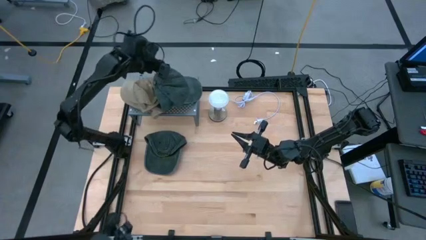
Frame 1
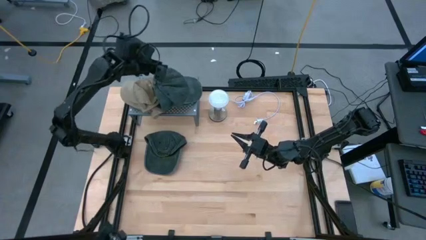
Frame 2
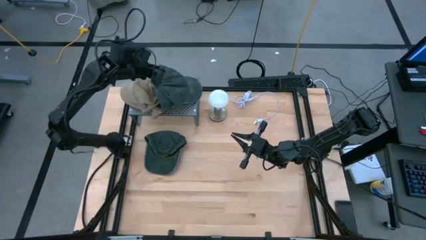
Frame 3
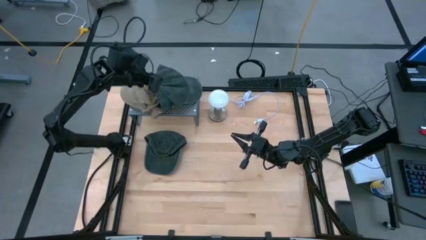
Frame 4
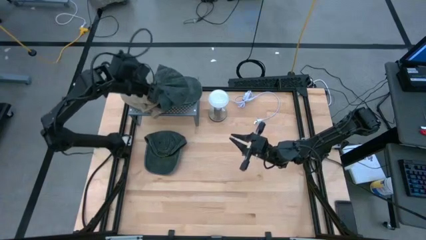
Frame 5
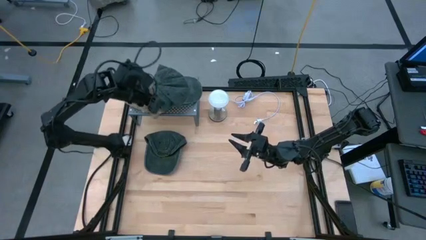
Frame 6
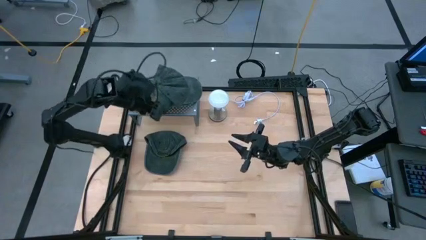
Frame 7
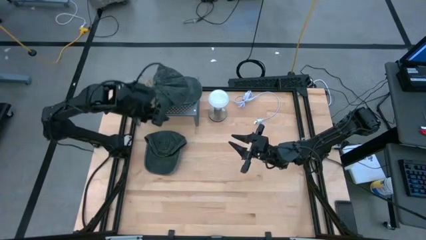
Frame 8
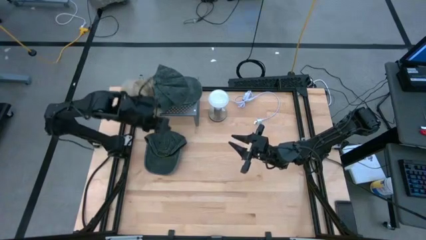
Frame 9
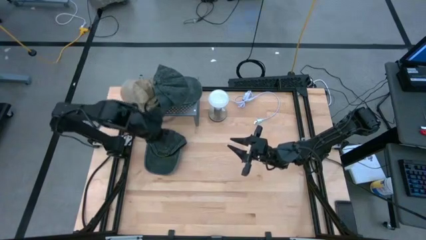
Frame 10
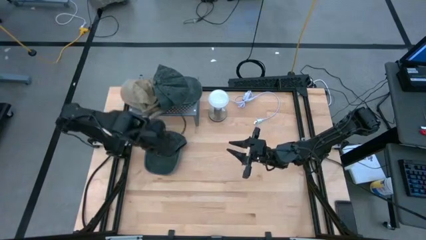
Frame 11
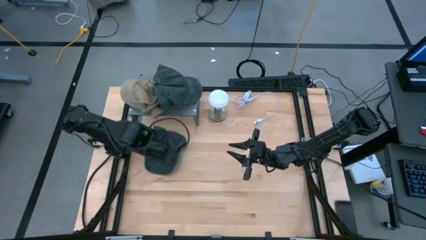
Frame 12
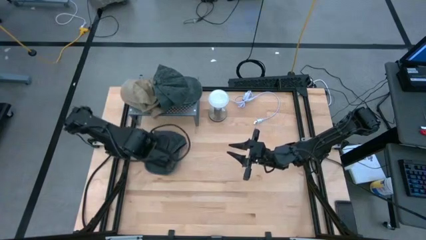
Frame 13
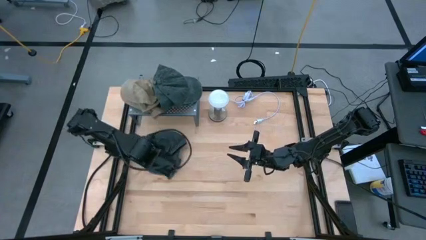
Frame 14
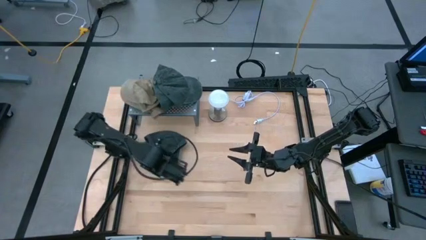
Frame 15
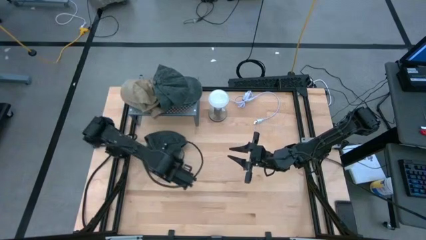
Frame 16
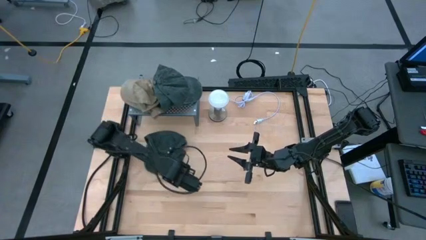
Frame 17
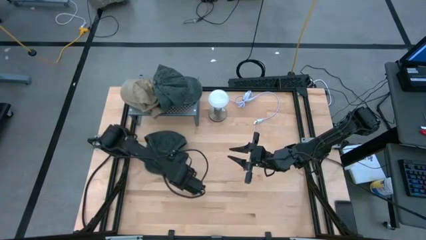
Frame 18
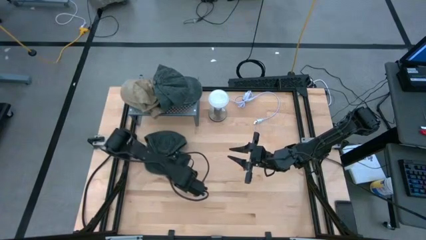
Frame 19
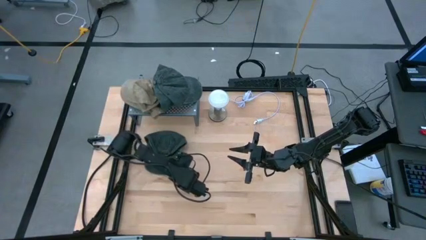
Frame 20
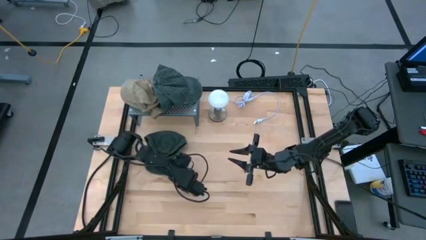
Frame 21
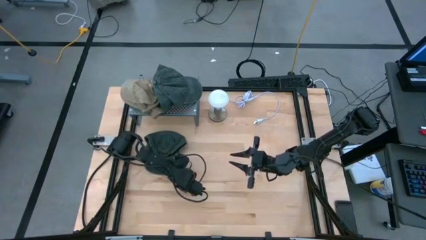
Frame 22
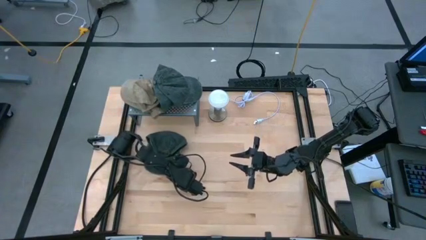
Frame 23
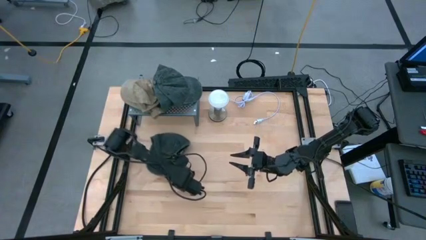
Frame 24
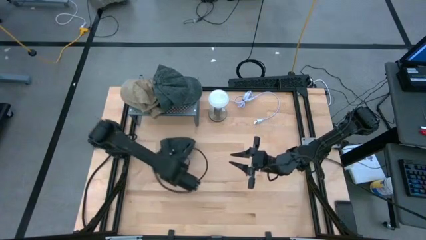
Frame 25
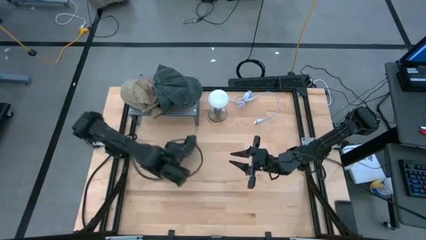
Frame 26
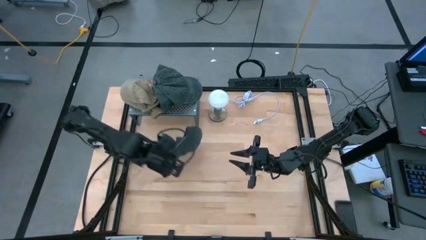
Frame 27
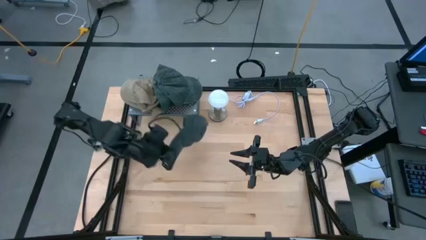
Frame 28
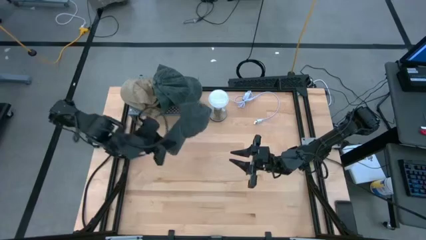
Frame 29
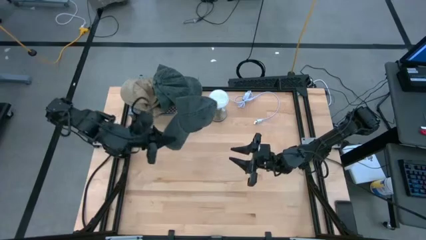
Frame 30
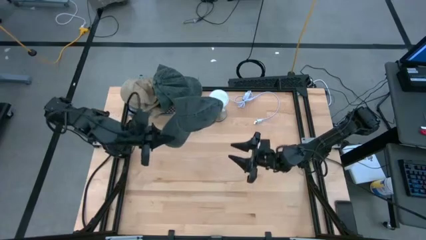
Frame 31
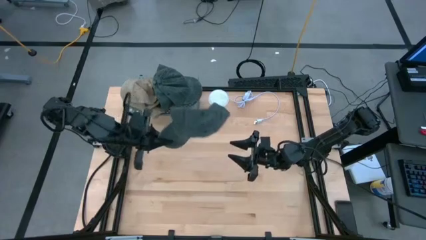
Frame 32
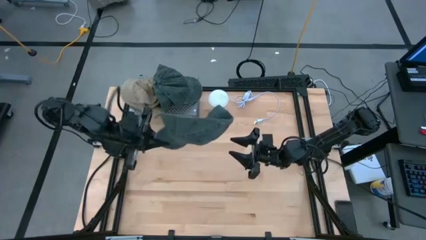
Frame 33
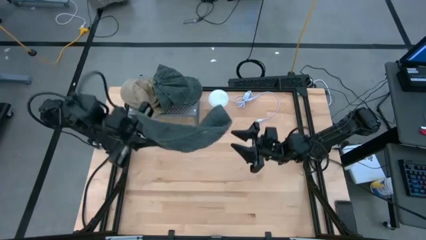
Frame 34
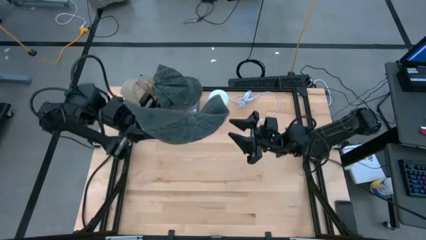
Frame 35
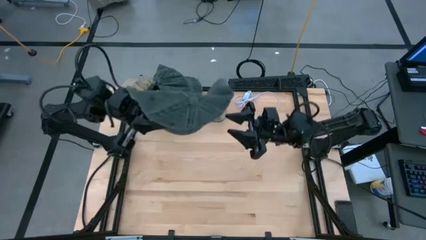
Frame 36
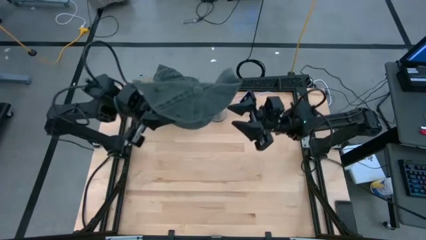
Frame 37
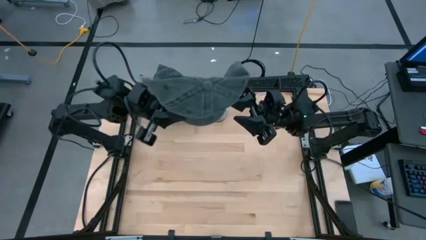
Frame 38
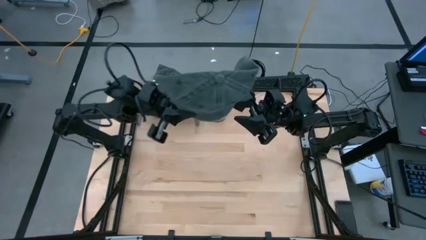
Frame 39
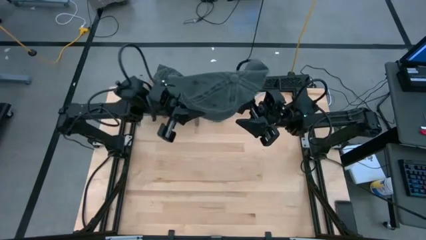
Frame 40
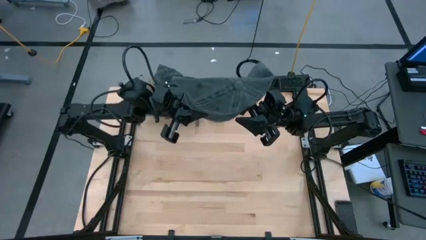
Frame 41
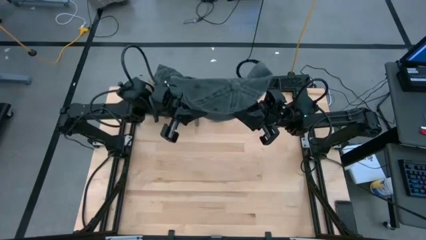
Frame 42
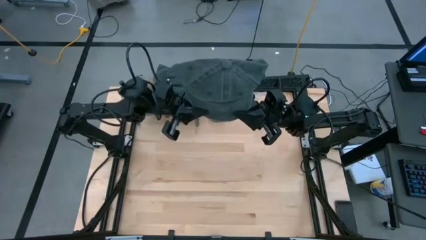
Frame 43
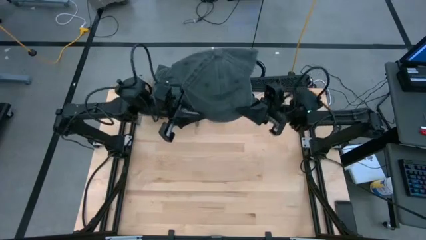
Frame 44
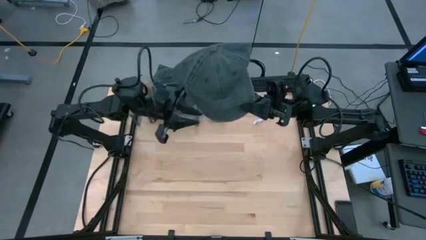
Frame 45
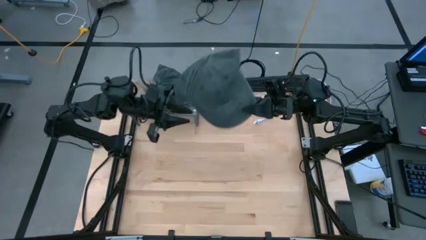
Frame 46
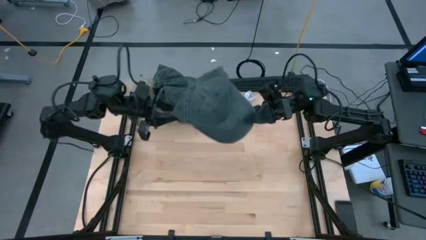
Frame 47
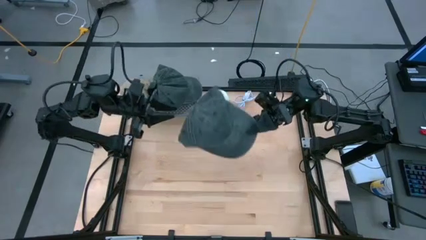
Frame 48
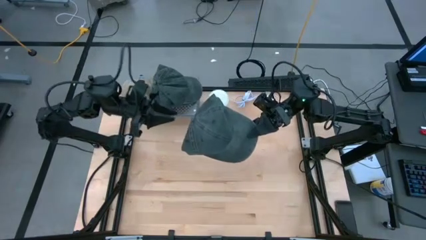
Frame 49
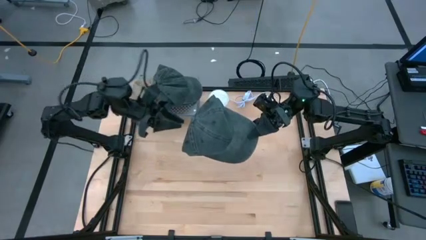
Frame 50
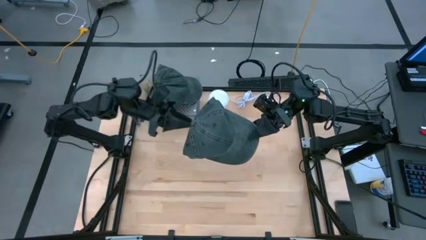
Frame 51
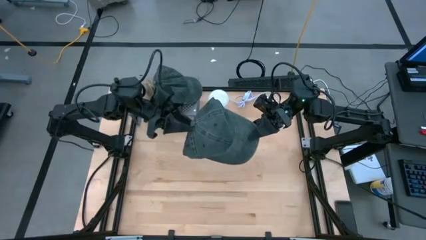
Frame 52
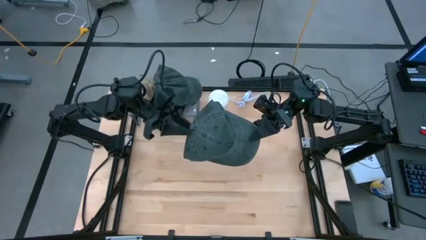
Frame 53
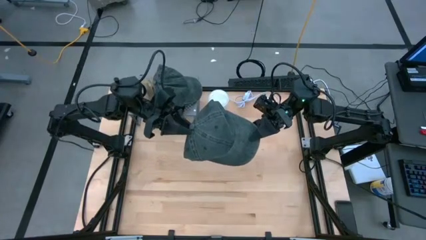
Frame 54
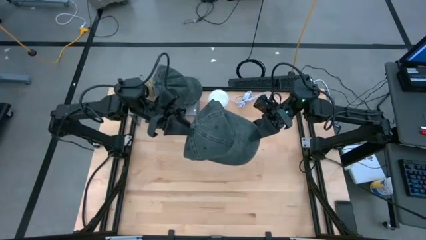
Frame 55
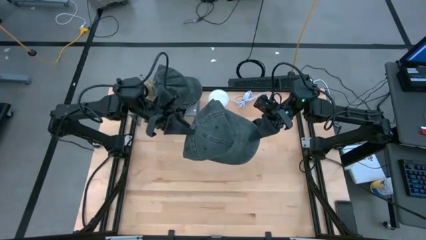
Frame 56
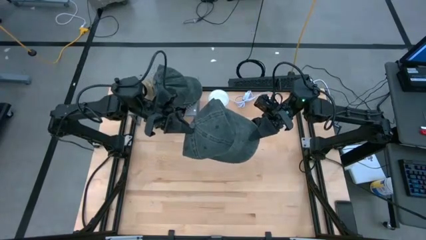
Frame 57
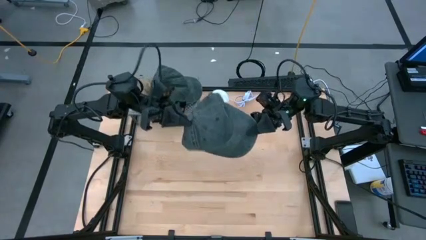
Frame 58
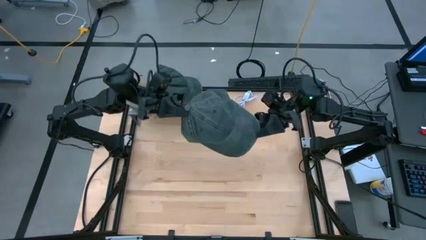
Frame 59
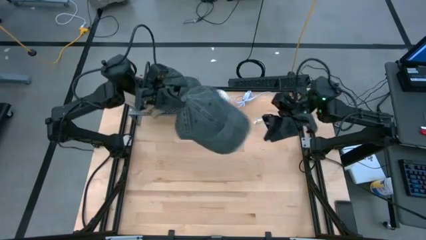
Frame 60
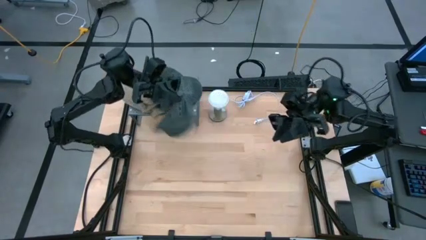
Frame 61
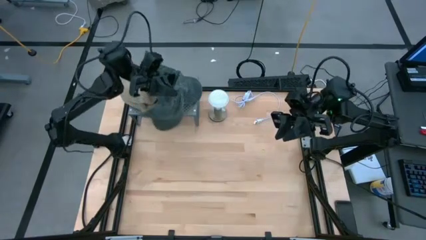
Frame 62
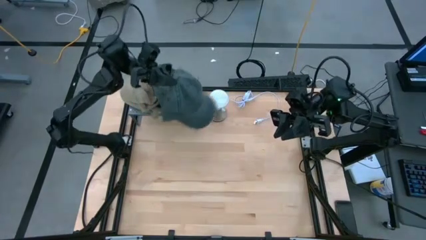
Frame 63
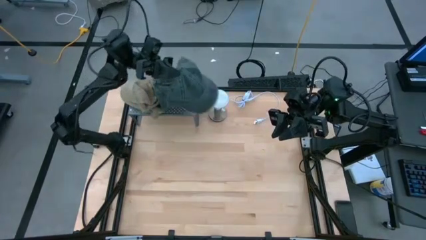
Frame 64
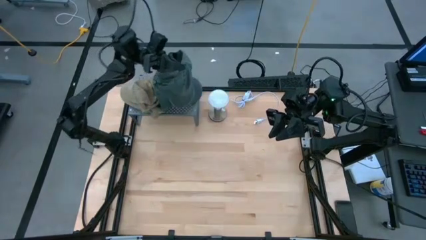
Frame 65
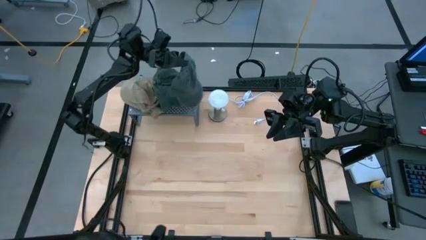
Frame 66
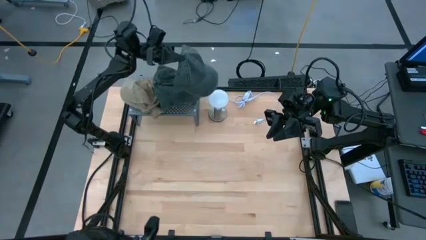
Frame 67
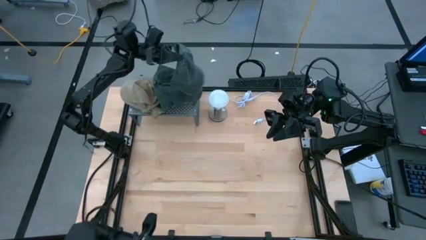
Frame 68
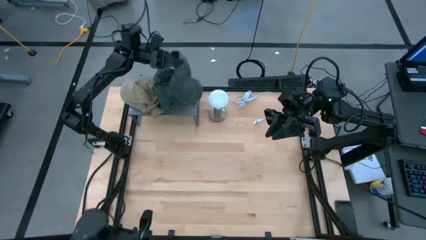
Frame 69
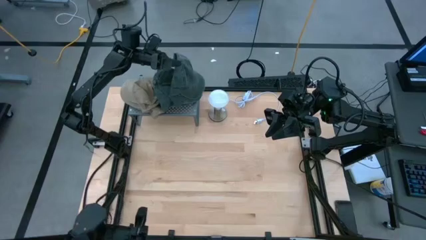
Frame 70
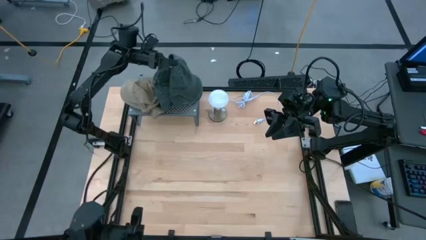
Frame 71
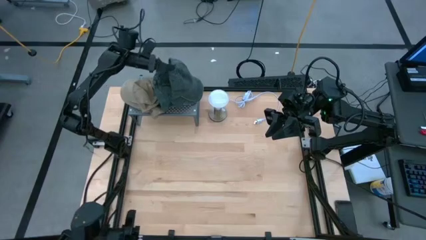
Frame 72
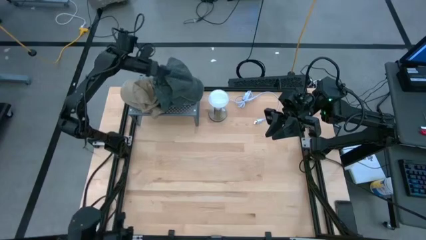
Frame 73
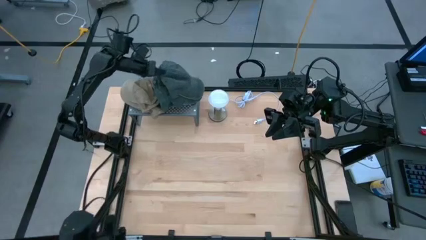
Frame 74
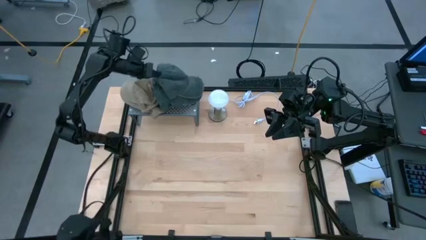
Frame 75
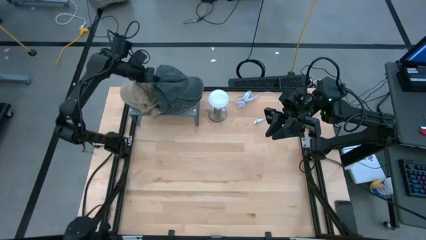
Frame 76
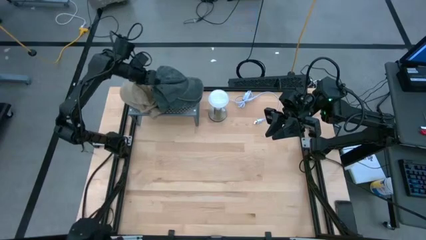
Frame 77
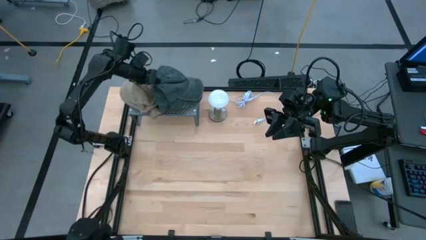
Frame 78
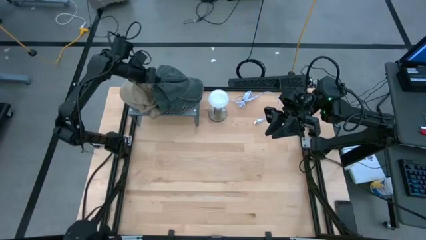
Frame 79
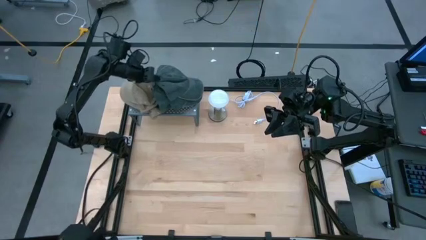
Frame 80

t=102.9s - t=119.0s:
Task: Pick & Place hat
Stack the black cap on the stacked black caps on the shelf

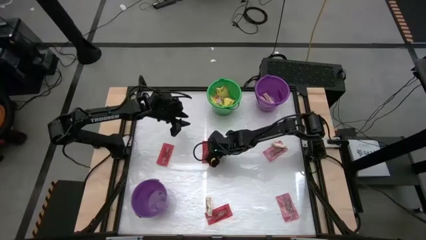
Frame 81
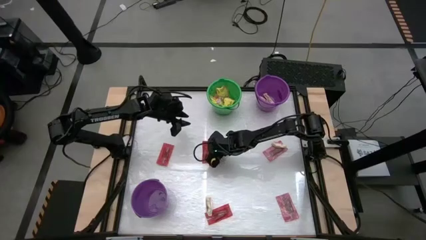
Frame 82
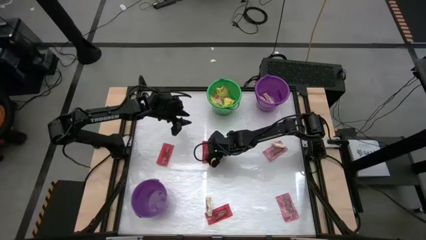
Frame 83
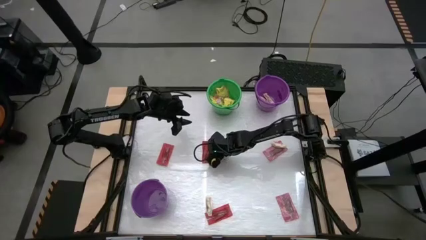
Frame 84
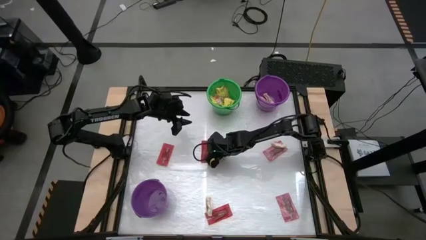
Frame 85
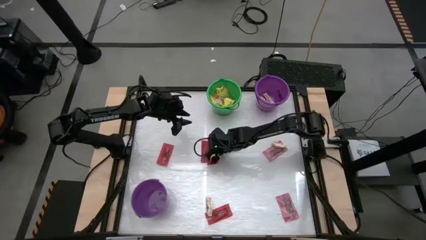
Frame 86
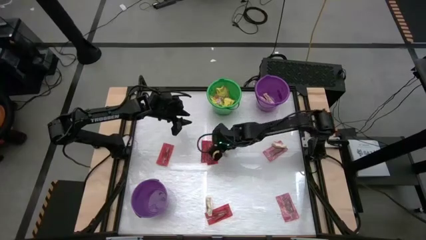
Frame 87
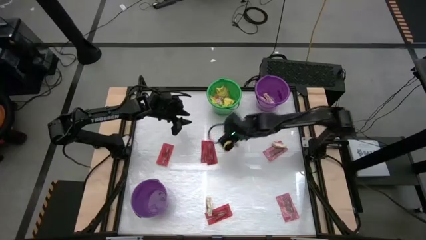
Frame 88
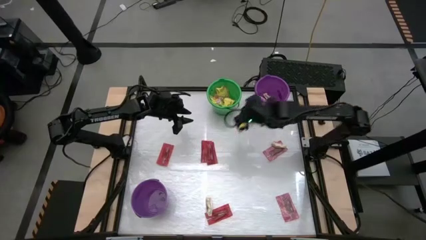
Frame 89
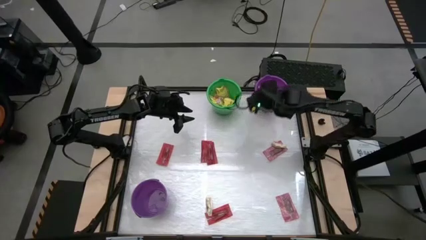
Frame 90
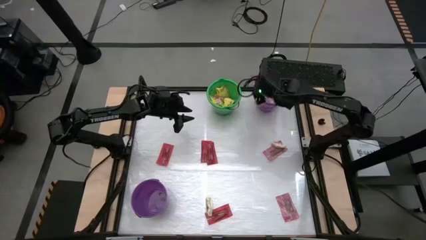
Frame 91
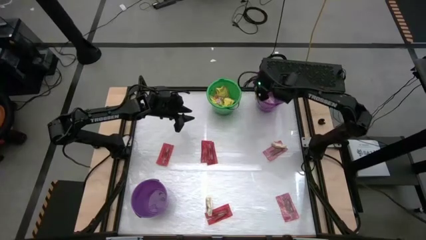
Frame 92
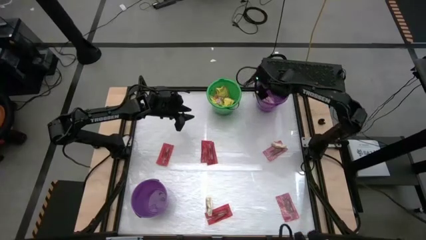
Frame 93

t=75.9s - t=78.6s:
Task: Sort candy by brand, put in halloween buckets
Put the light brown chocolate bar into the top violet bucket
